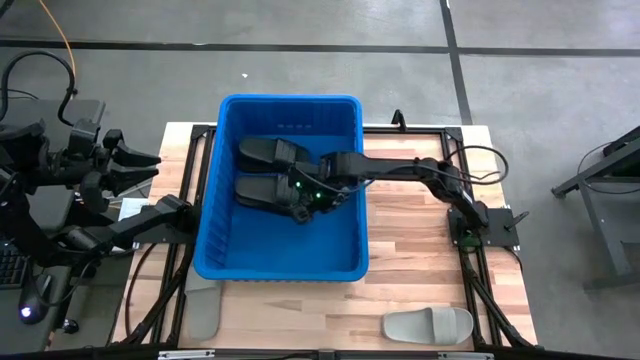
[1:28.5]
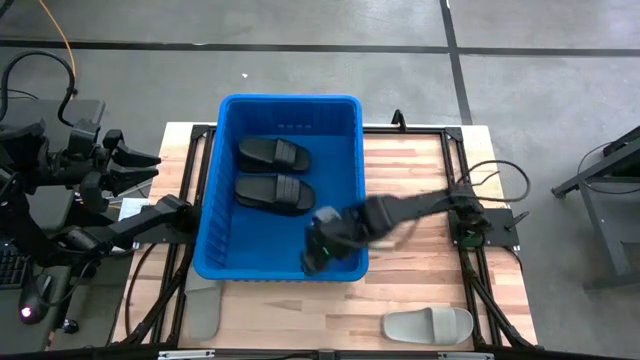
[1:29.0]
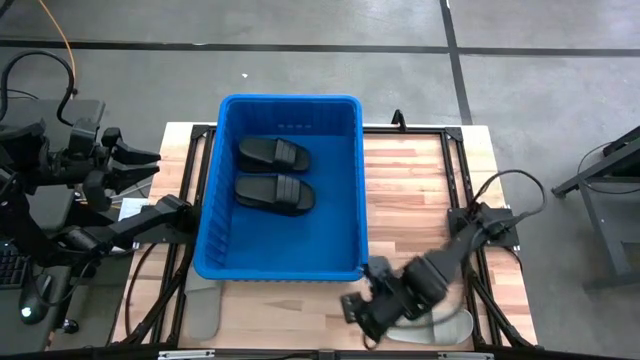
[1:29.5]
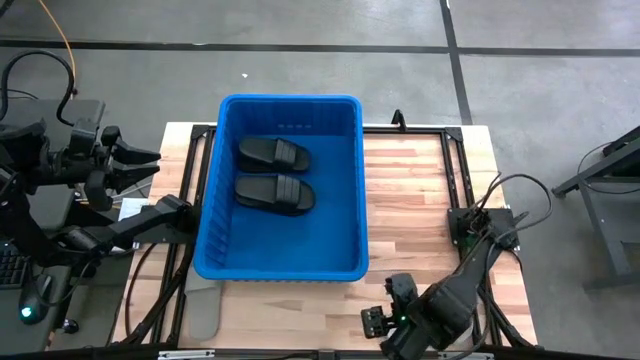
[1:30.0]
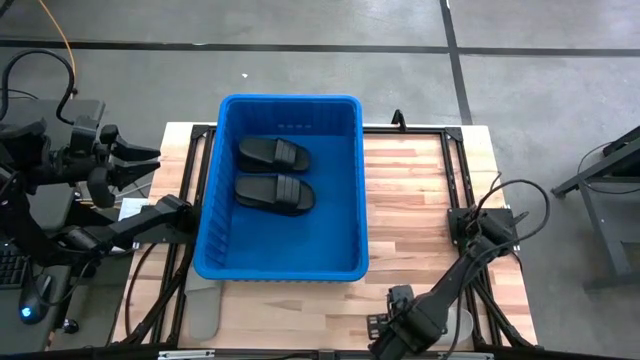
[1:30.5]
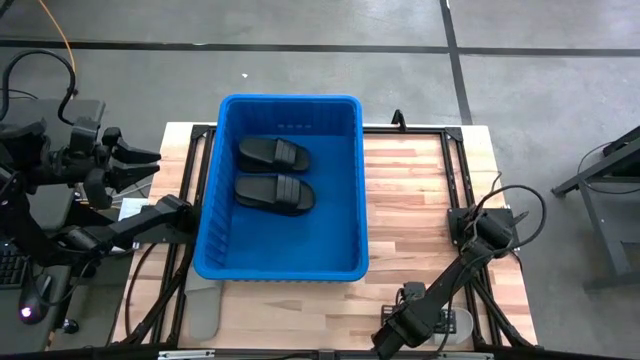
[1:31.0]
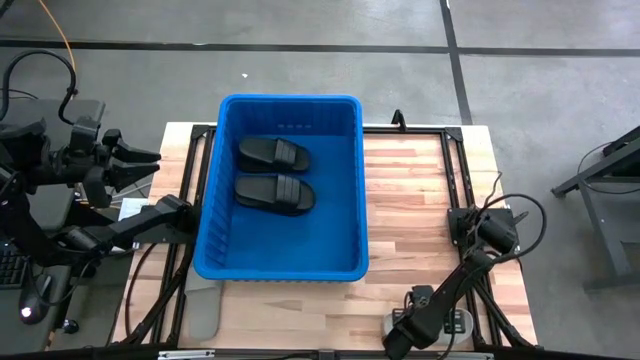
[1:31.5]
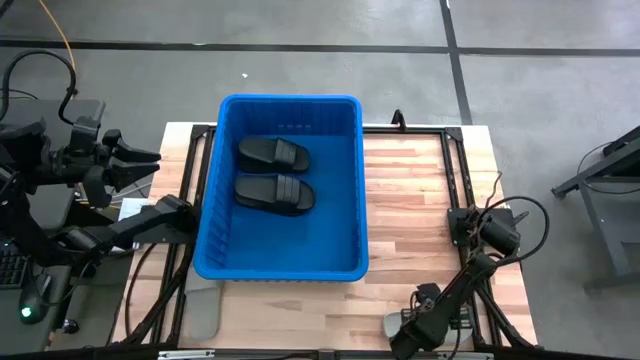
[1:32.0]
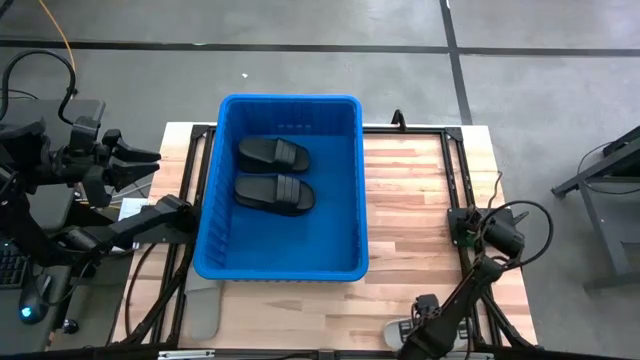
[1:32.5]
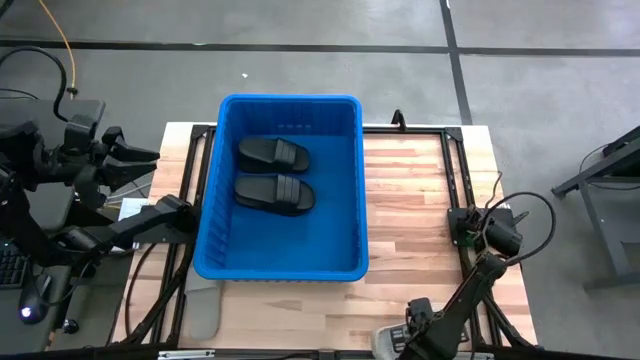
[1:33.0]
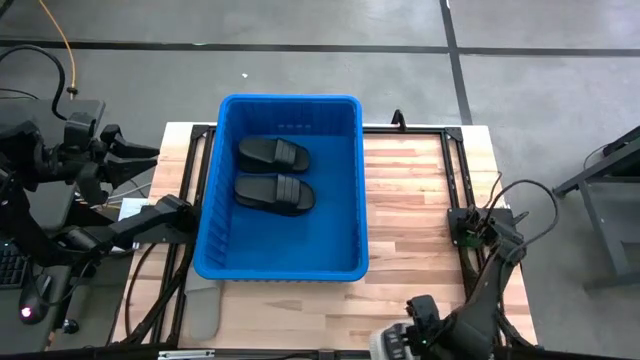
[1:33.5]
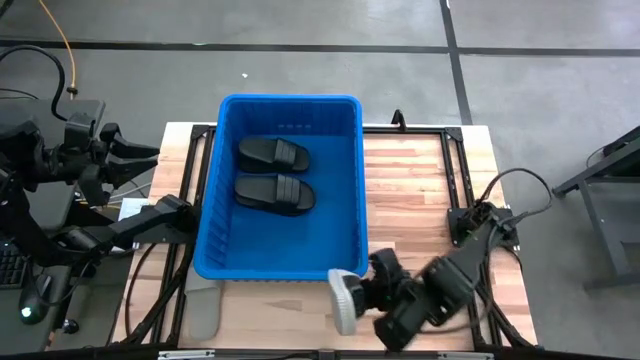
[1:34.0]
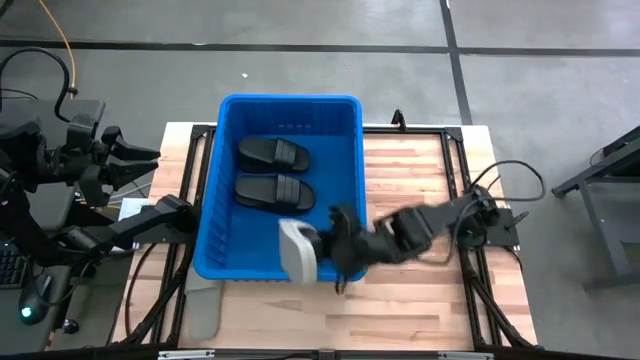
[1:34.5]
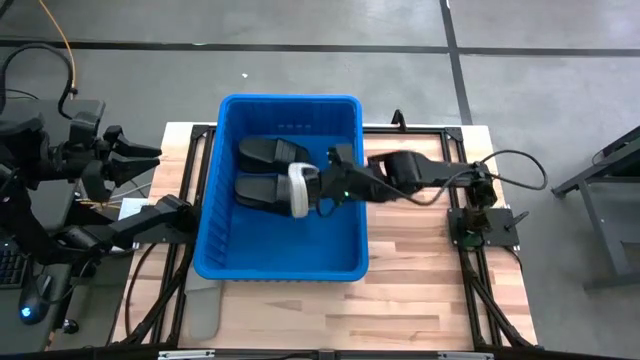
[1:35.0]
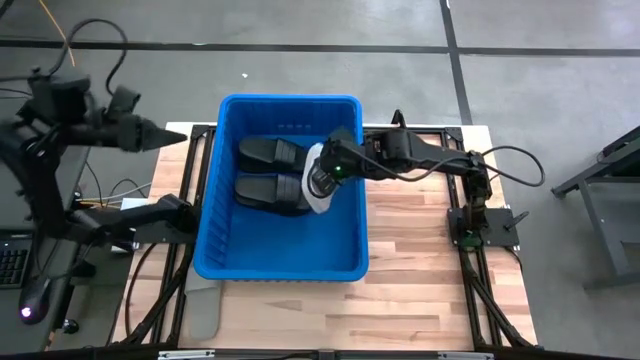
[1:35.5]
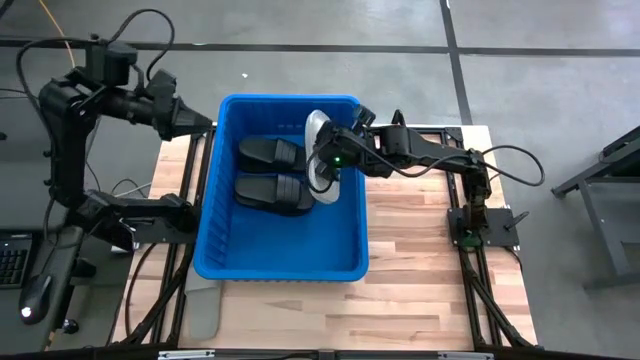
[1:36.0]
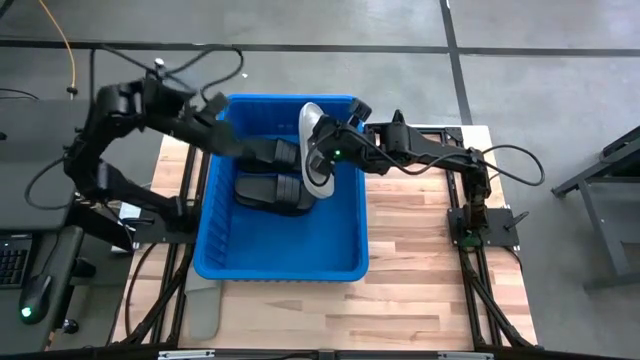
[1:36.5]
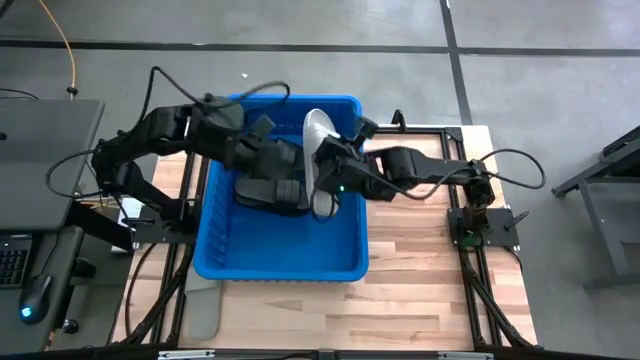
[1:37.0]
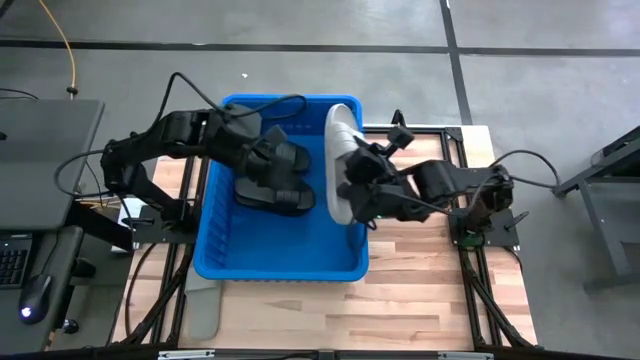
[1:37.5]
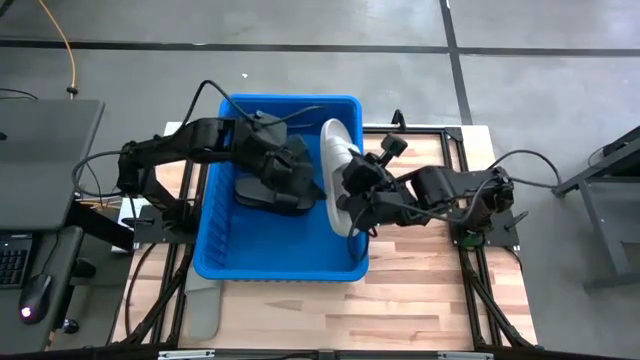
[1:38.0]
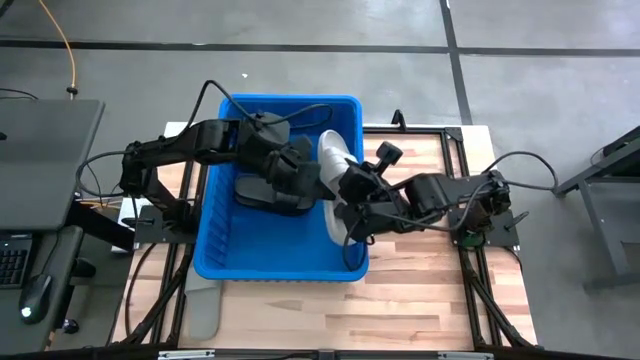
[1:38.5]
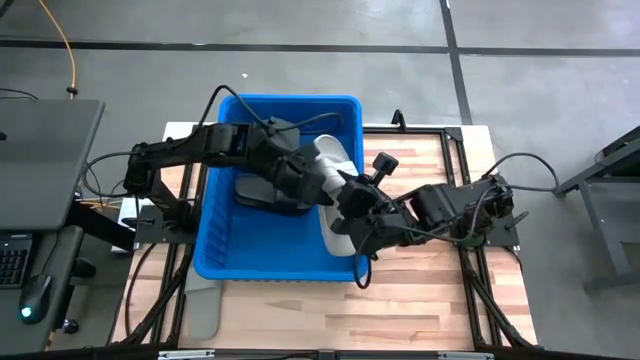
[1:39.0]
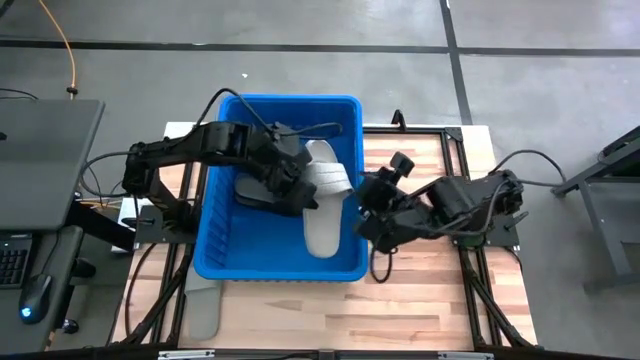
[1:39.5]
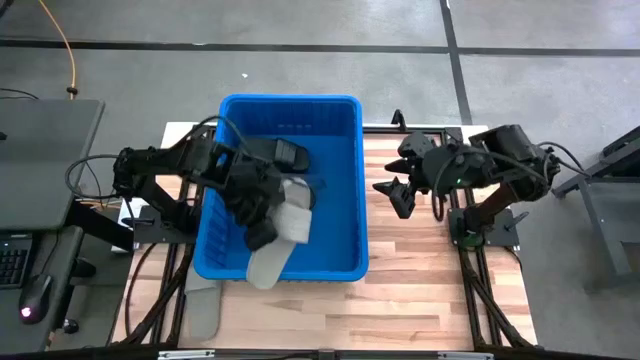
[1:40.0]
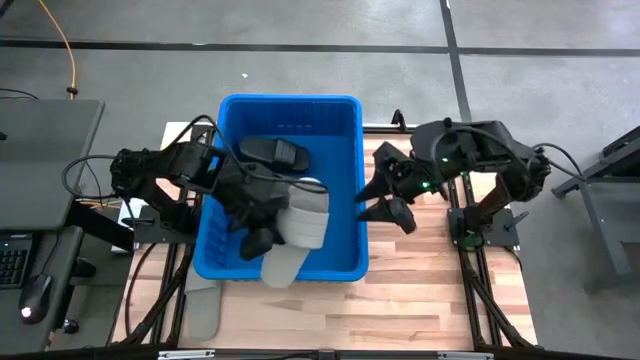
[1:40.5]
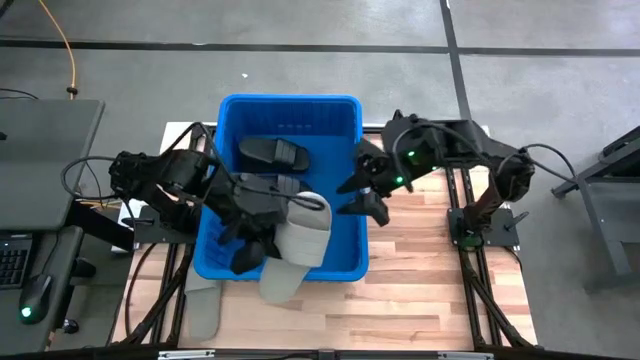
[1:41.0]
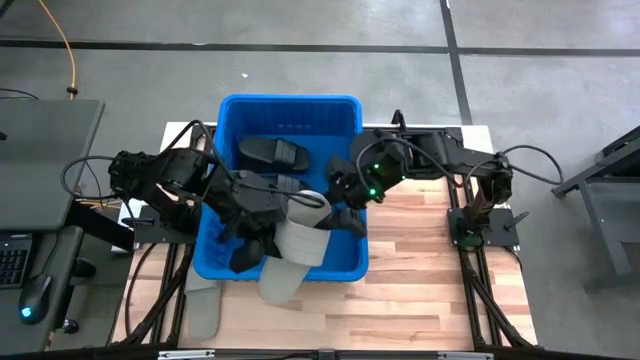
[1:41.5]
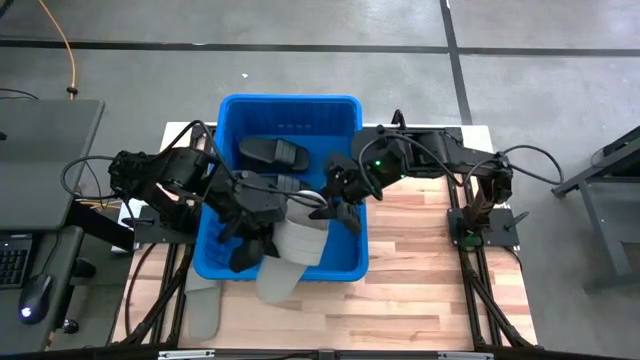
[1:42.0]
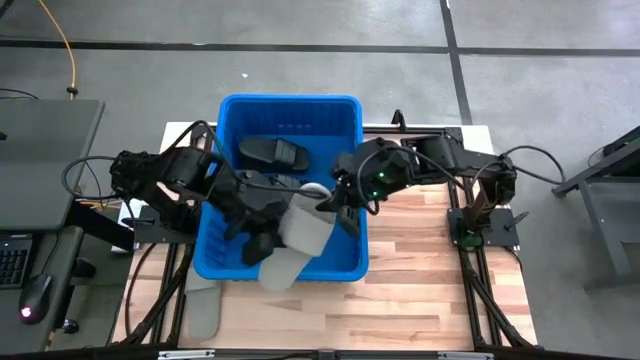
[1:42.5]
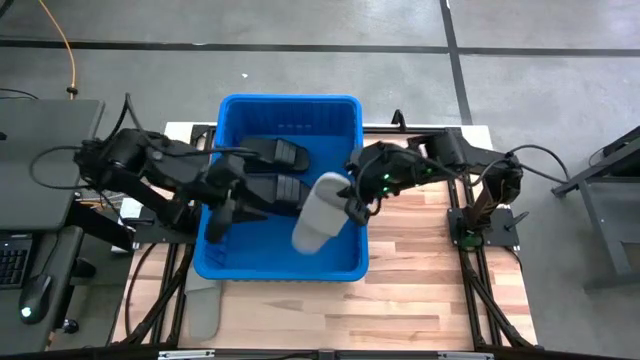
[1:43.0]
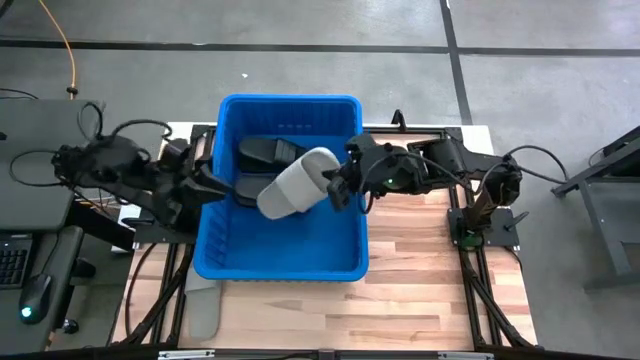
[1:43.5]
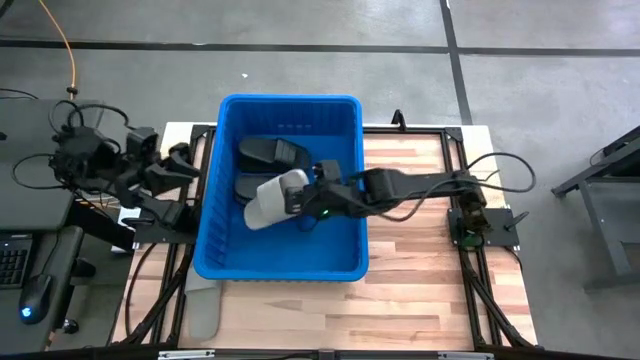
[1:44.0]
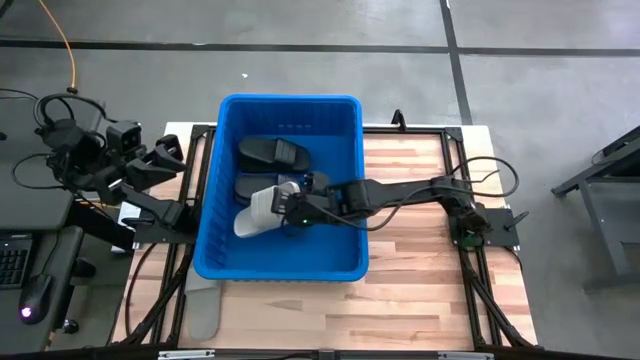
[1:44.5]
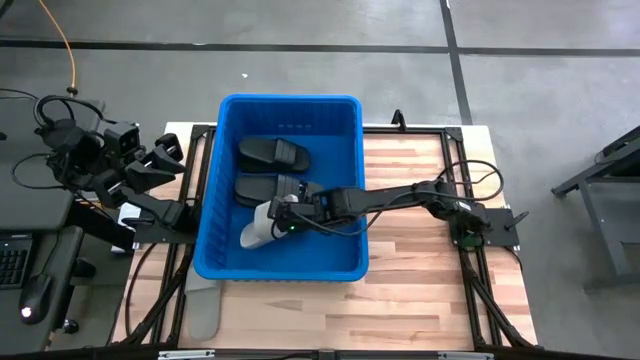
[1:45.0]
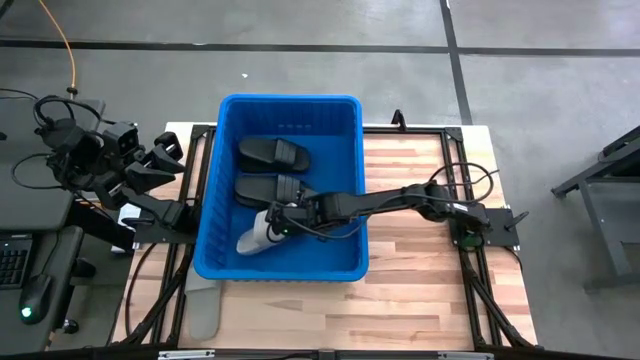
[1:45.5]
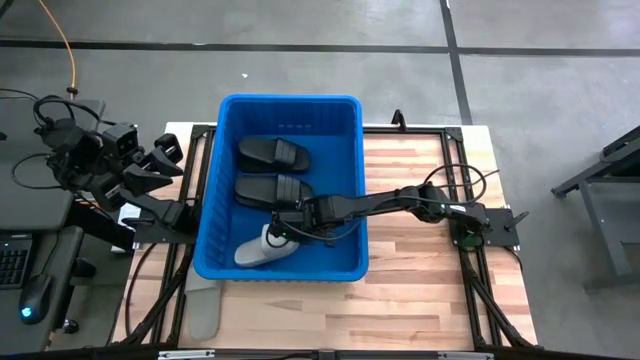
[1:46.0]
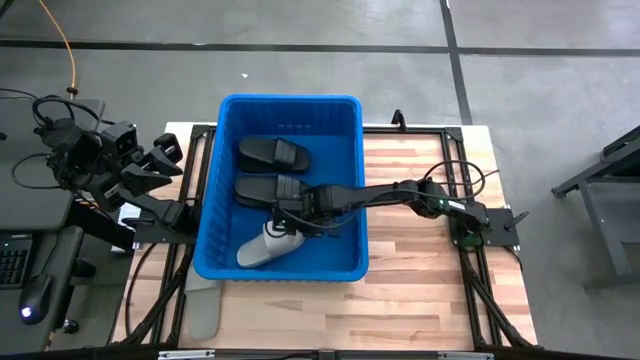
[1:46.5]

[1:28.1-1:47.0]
Task: Pick and place slides into bin
Put the right white slide into the blue container

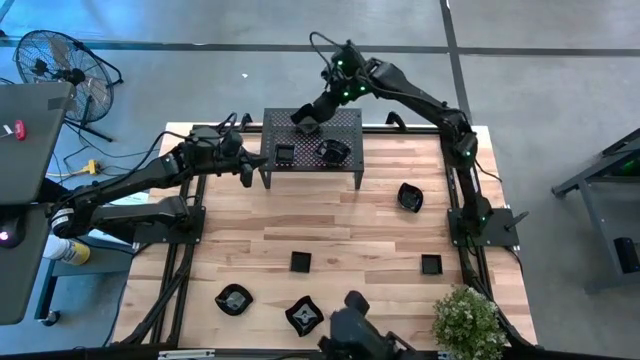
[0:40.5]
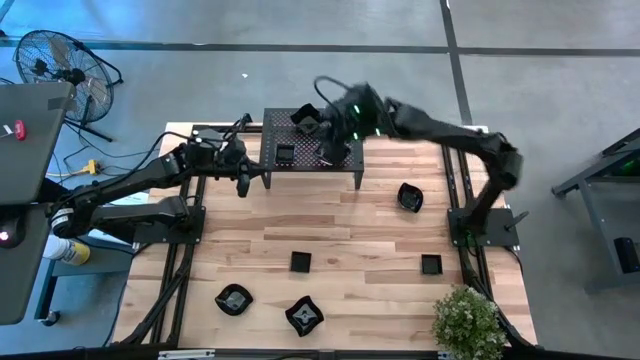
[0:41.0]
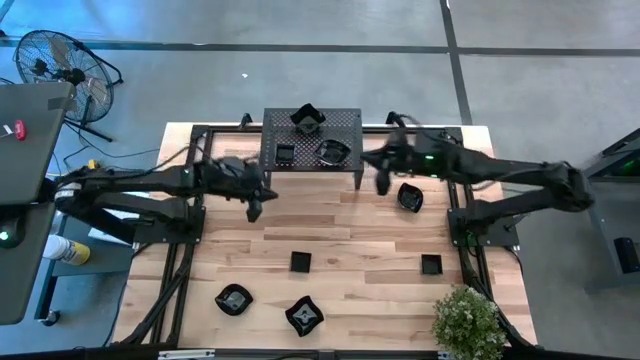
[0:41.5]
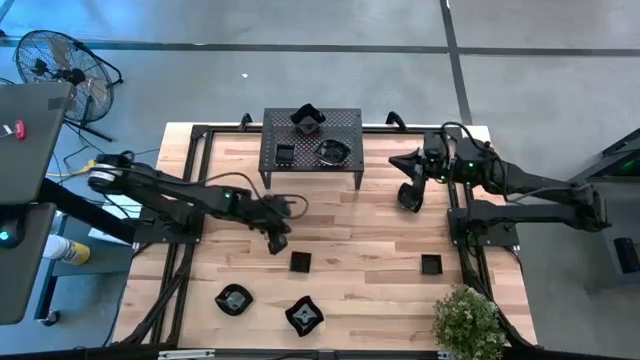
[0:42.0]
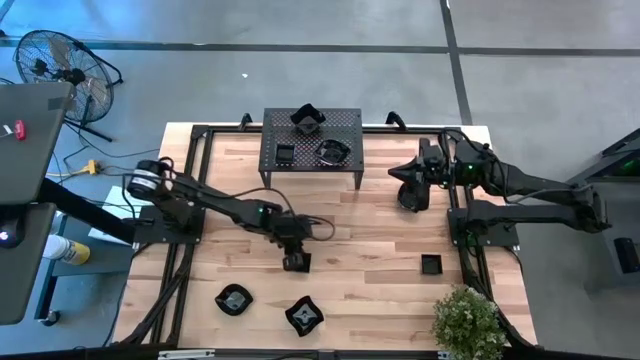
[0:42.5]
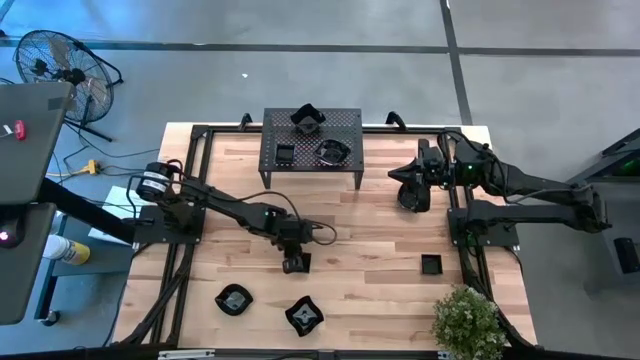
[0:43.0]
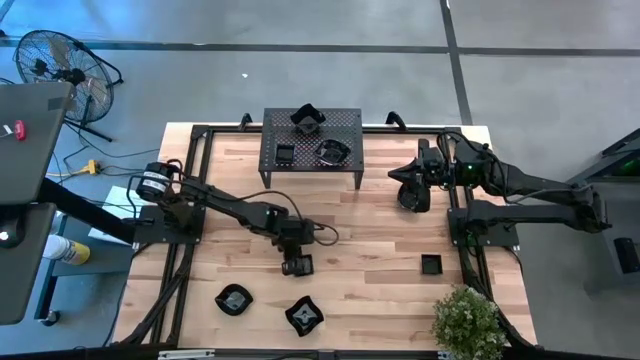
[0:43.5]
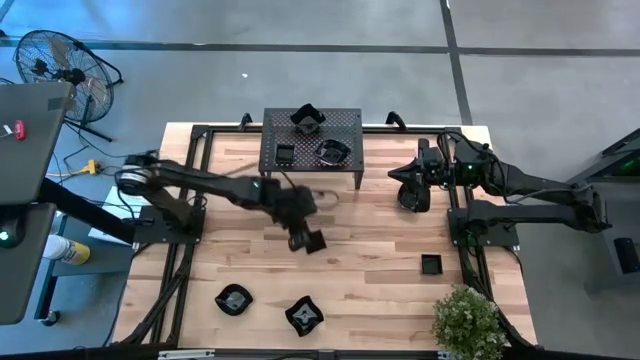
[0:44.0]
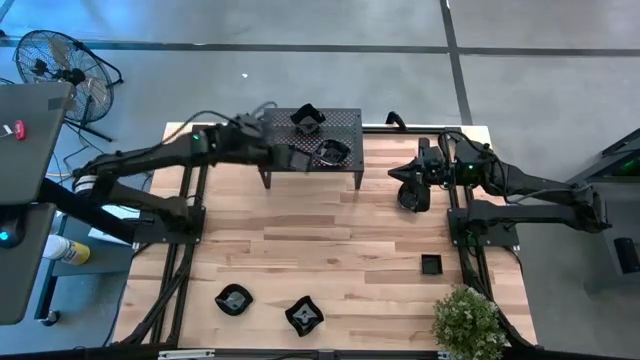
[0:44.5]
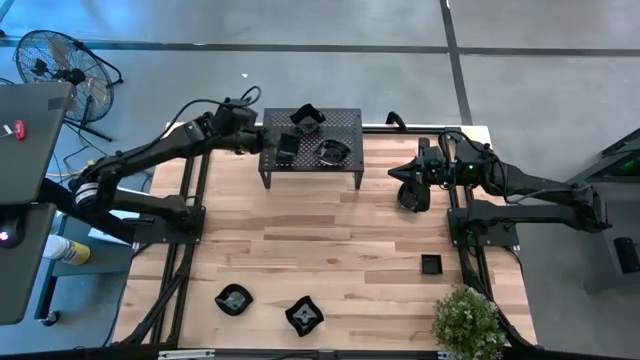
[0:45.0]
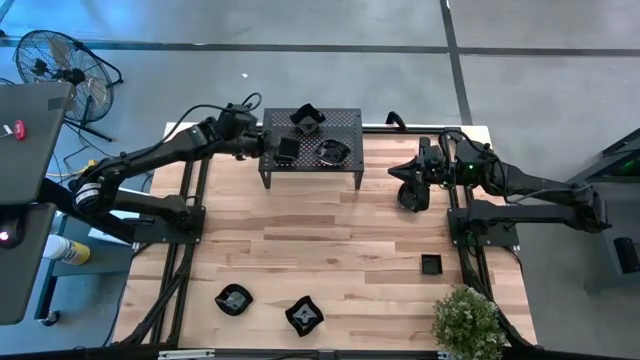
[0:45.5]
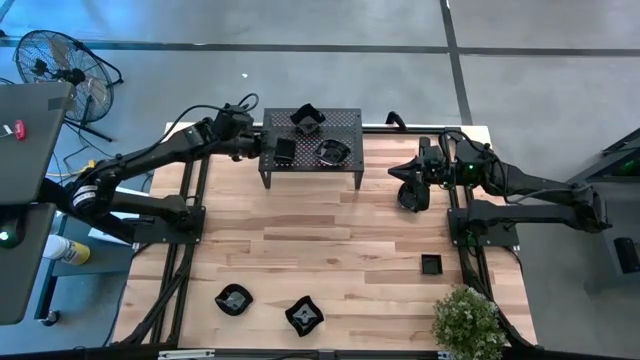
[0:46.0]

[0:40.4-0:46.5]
Task: Pick & Place Mini shaped plates
Stack the black square plate on top of the black square plate on the shelf
